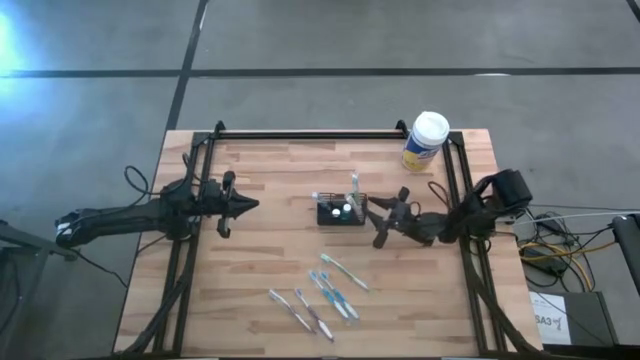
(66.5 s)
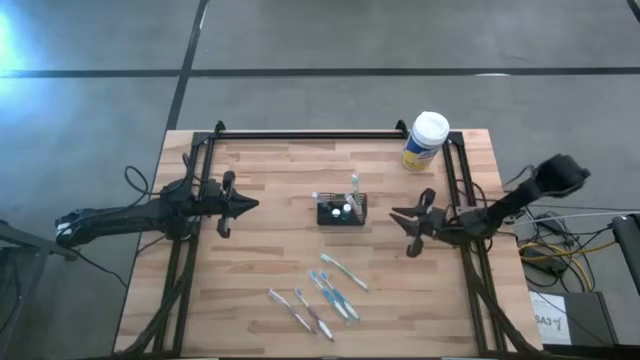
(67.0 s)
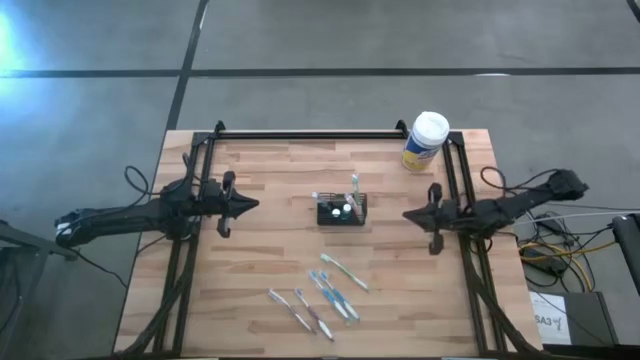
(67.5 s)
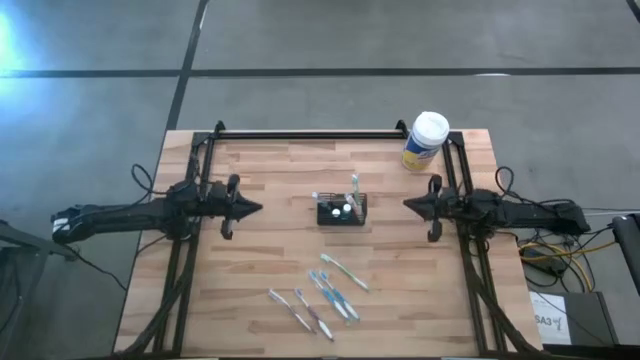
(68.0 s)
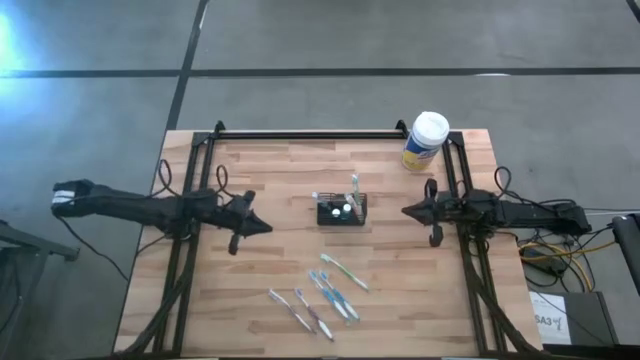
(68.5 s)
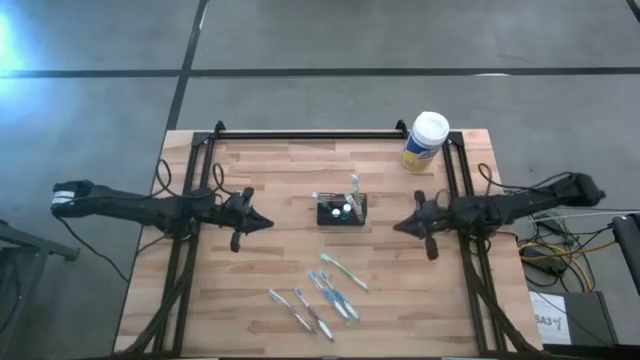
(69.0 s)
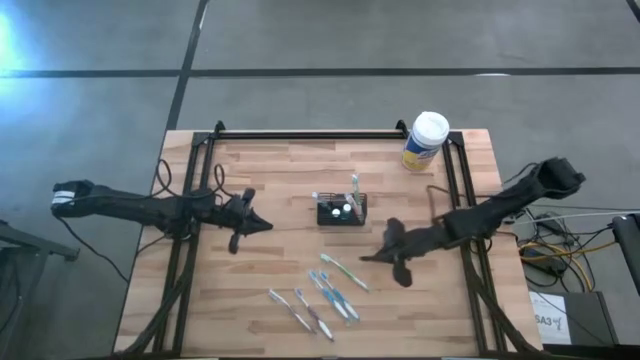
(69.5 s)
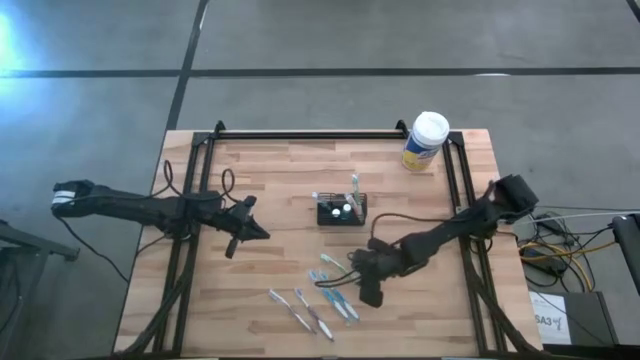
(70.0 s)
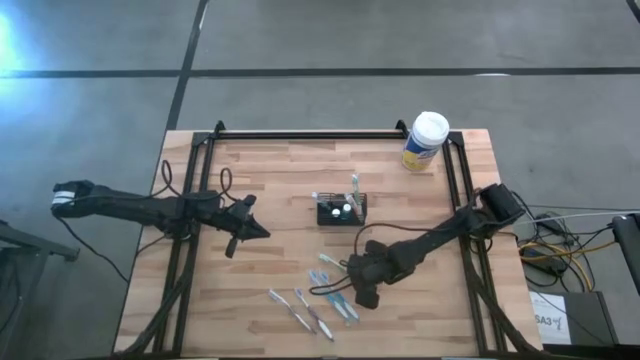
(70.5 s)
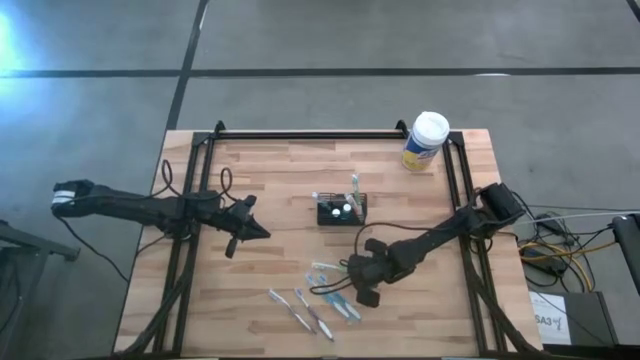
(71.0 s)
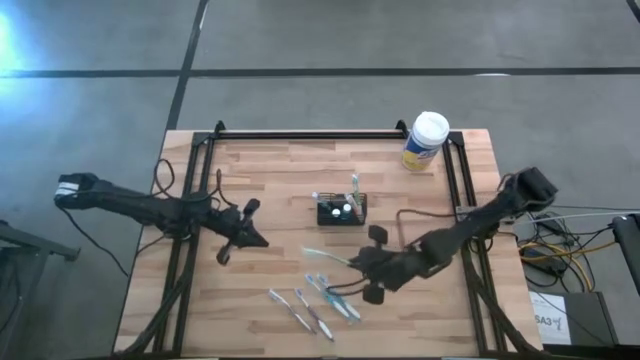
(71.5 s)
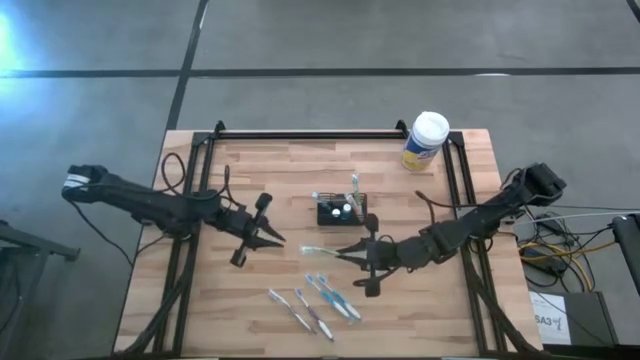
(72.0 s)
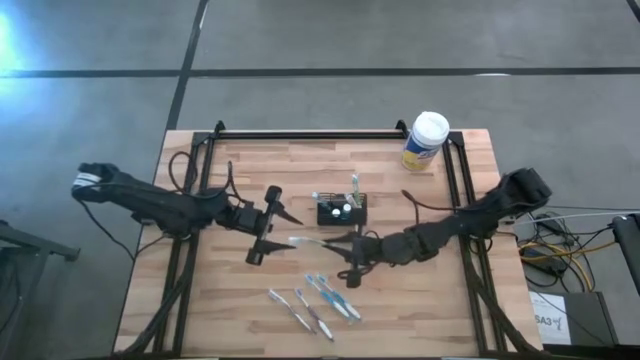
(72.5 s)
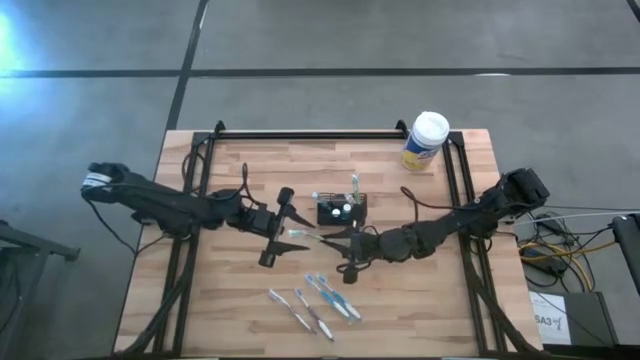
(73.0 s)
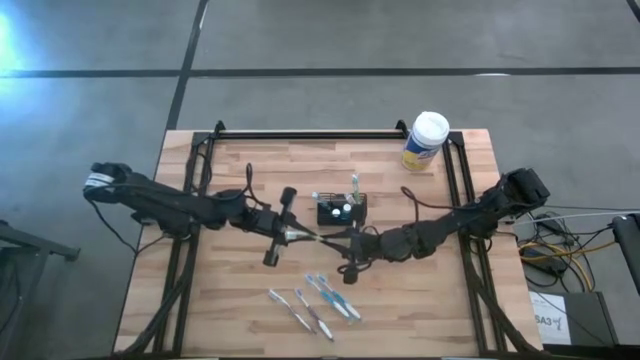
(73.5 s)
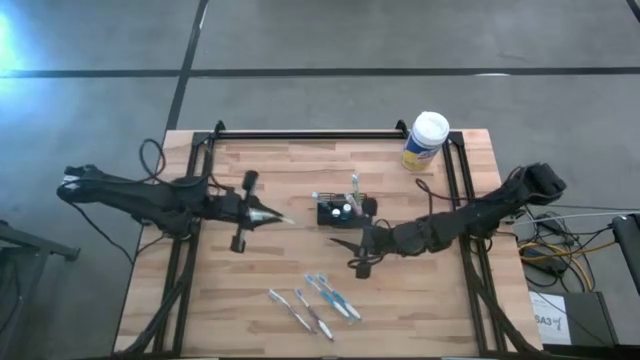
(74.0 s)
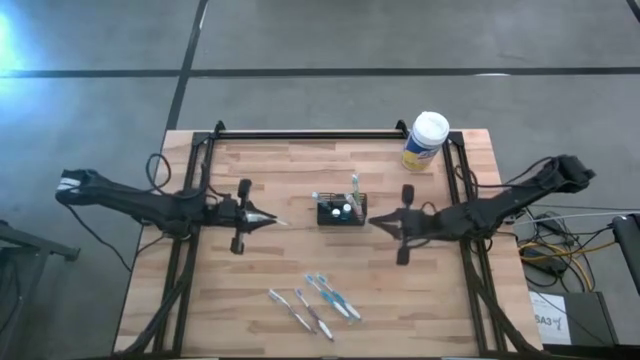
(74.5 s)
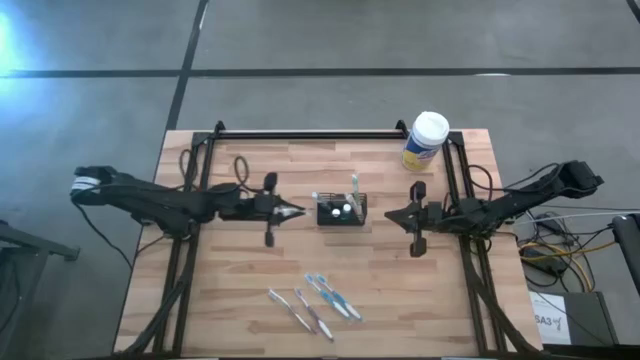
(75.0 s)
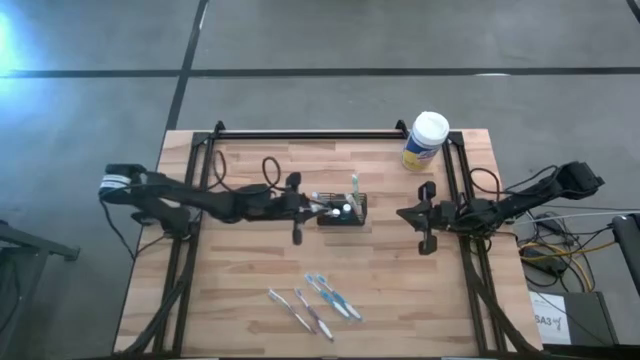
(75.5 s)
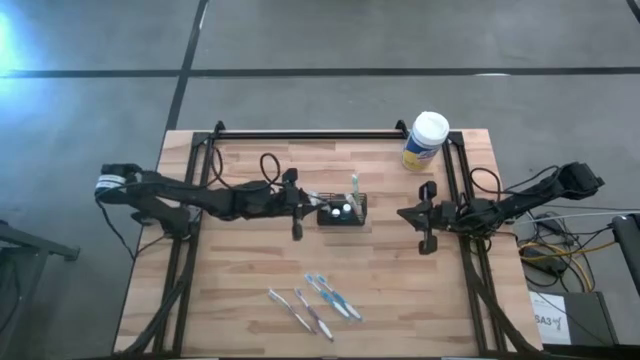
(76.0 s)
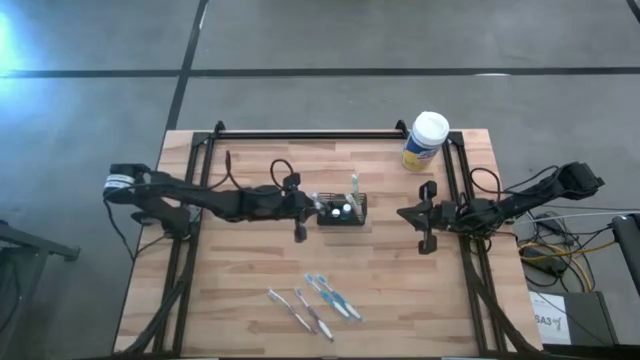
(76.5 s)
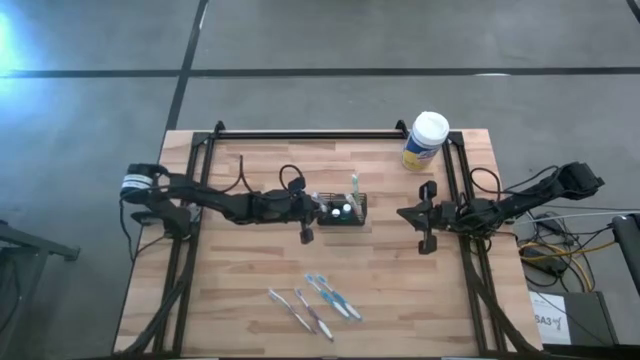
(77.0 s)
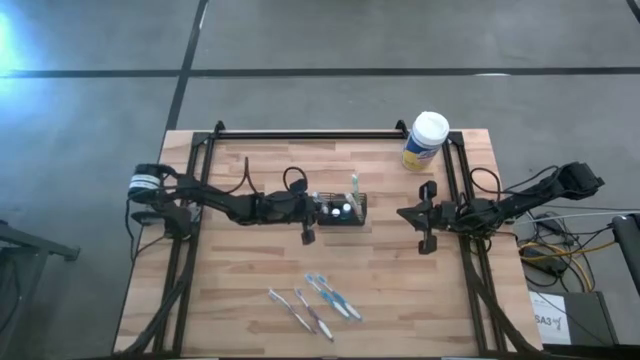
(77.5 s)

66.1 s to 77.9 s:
Task: Pick & Place toothbrushing station
Put the green toothbrush into the wire organizer

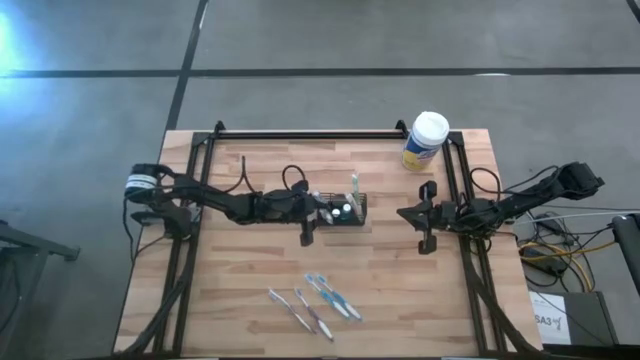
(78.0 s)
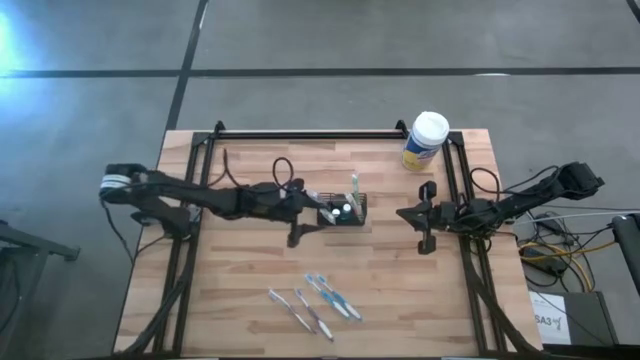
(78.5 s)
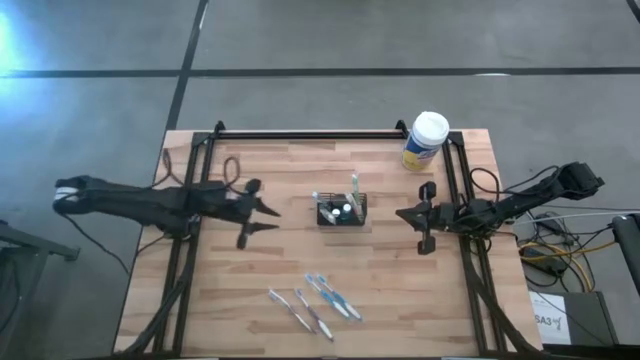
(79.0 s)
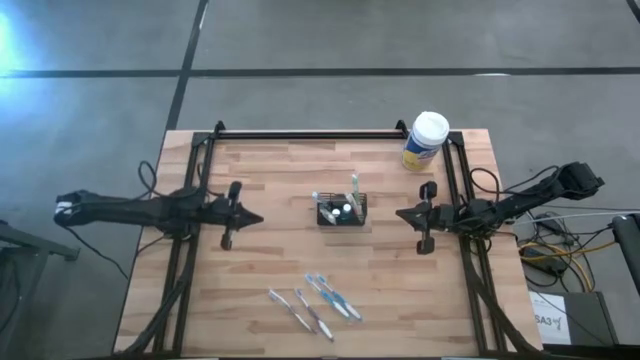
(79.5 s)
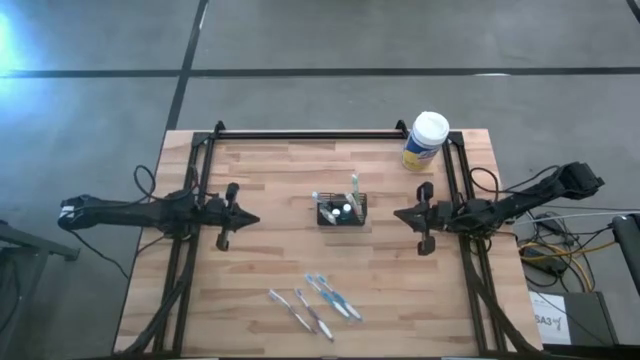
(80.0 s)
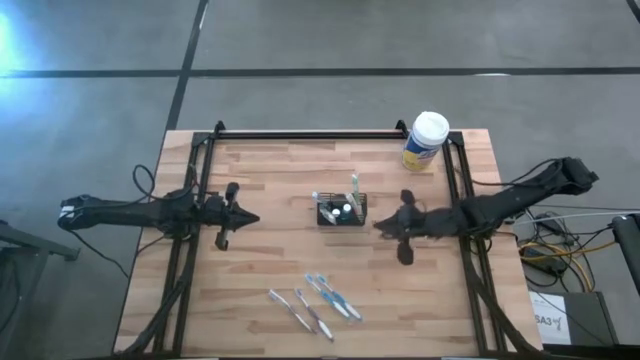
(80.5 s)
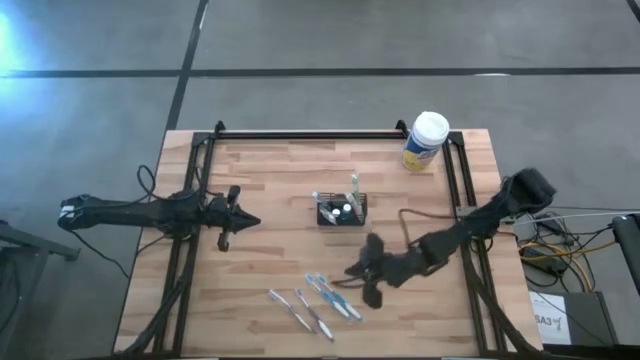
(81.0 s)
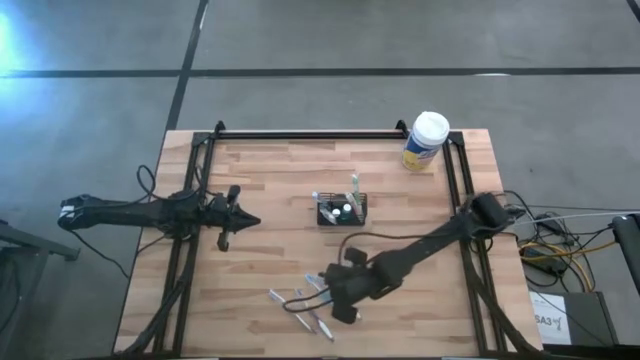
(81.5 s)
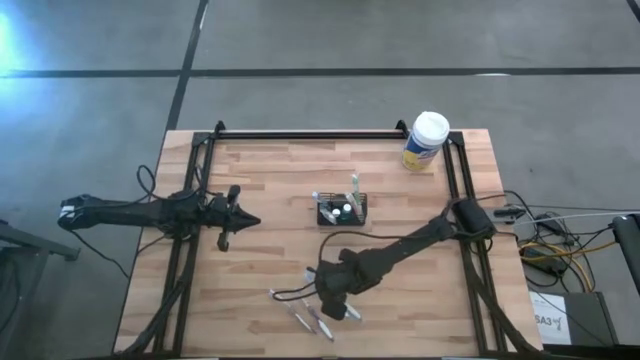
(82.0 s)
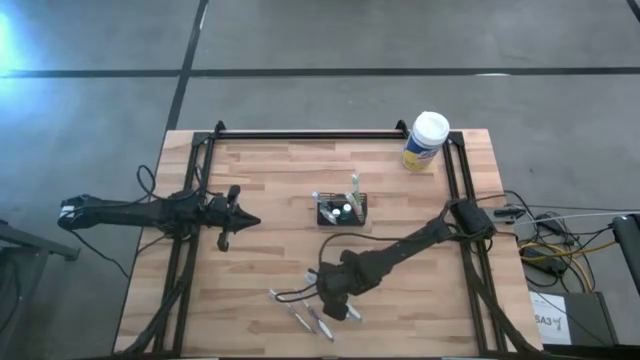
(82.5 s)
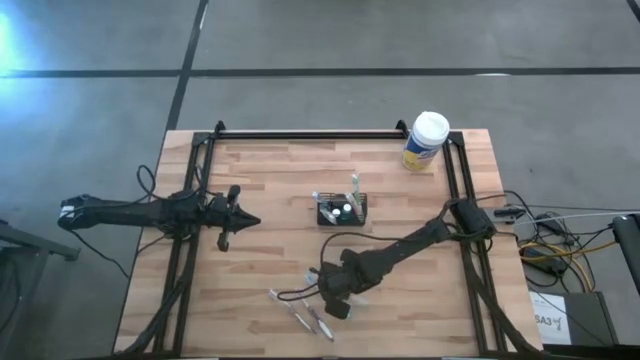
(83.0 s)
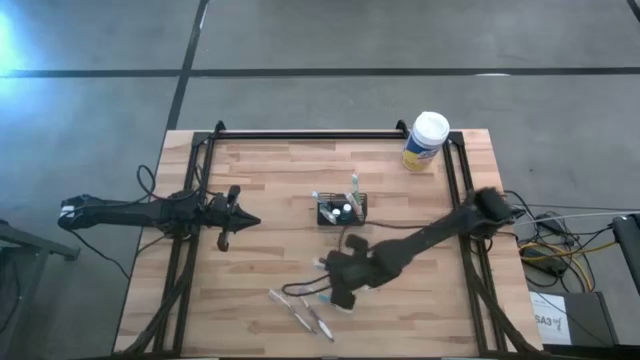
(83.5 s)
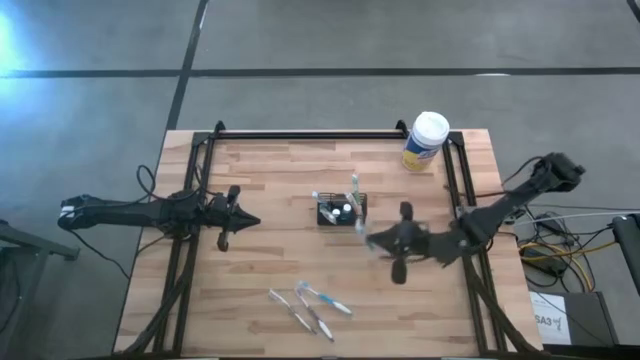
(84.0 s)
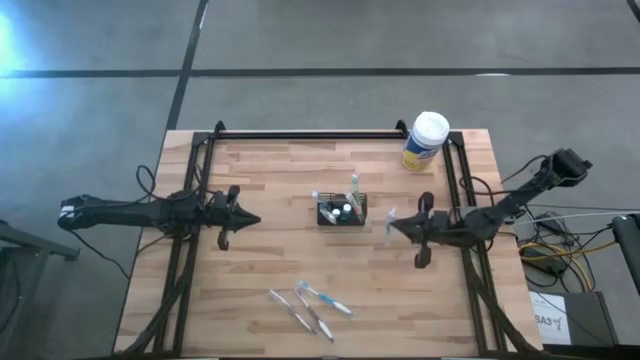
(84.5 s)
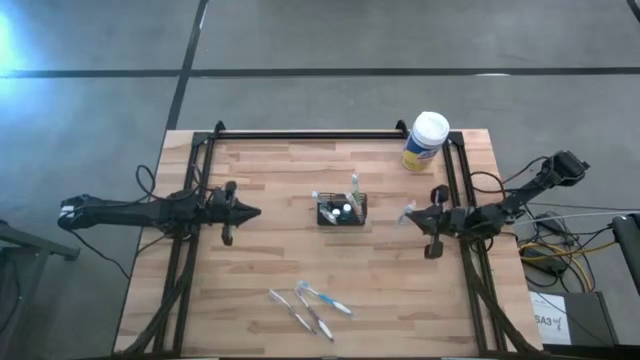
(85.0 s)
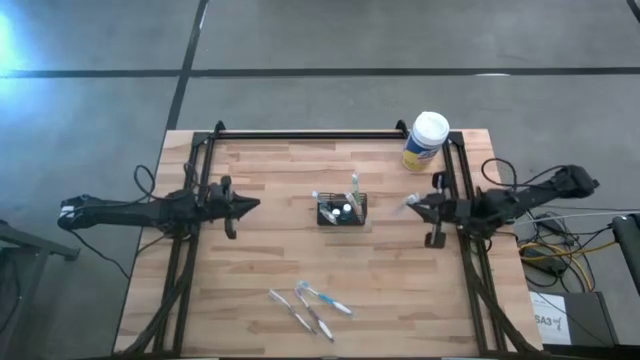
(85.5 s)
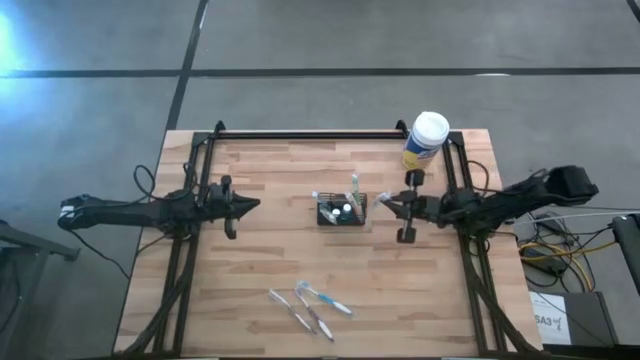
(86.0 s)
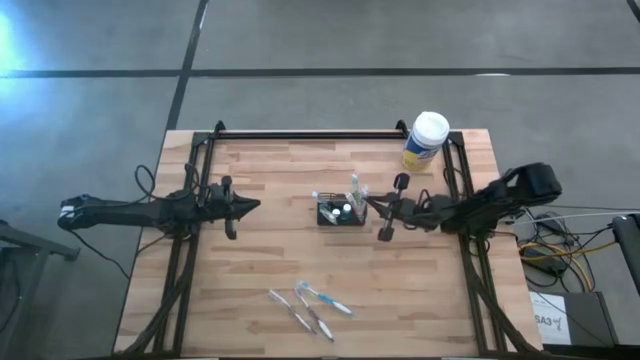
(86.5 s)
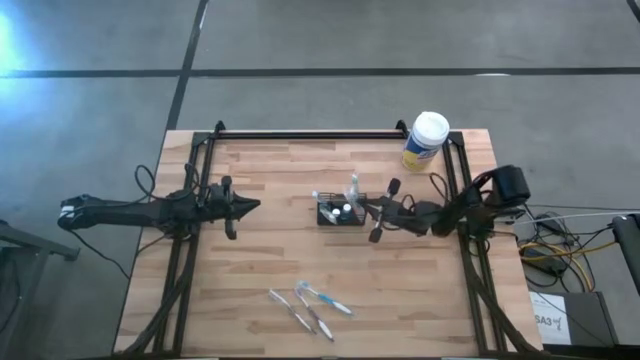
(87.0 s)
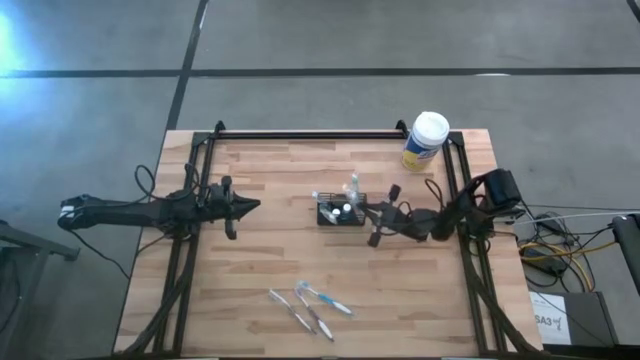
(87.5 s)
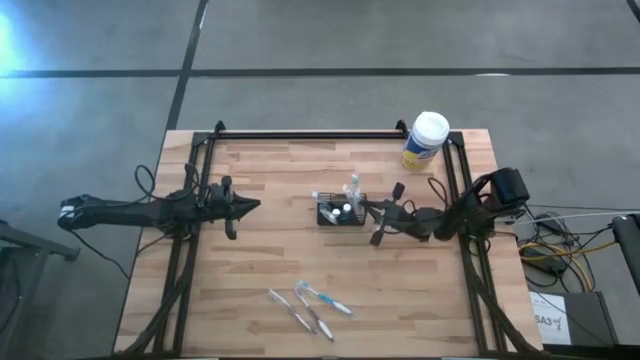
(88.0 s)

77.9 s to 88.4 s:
Put the right blue toothbrush into the wire organizer
